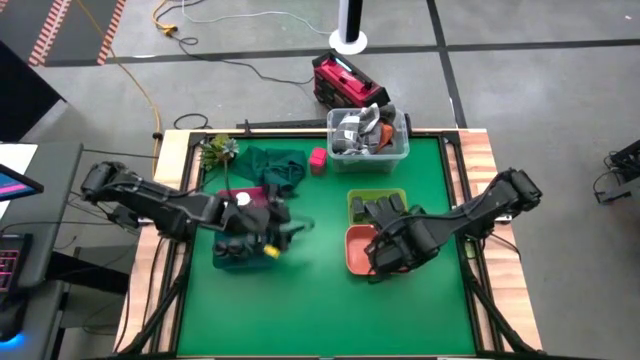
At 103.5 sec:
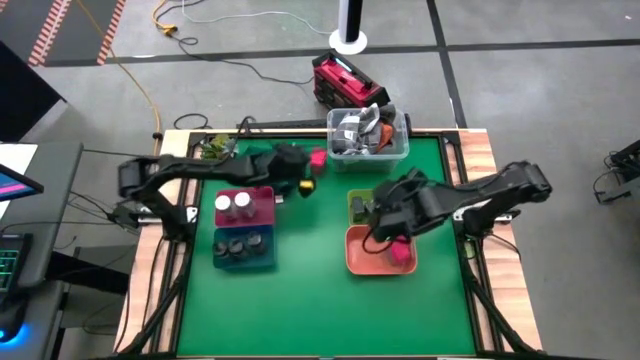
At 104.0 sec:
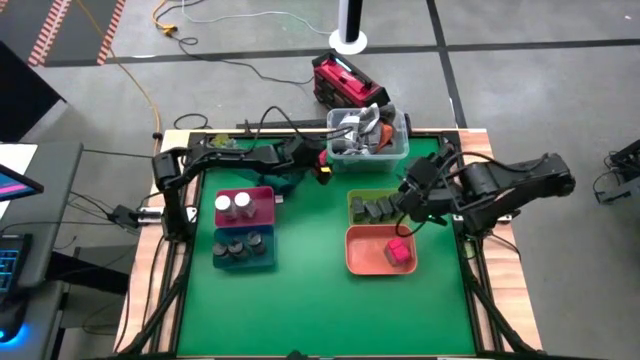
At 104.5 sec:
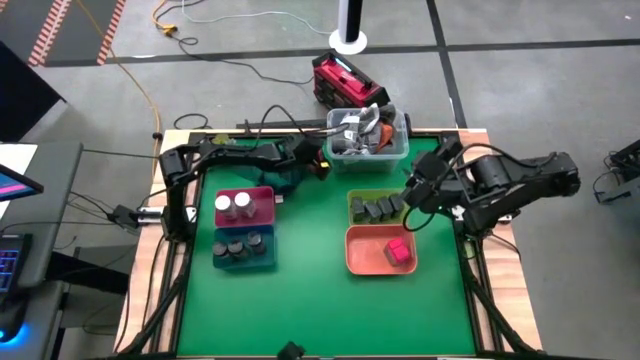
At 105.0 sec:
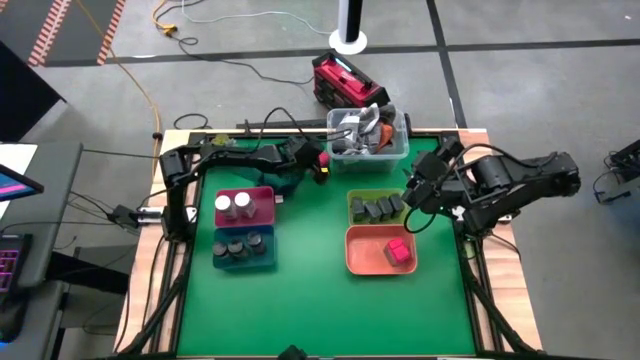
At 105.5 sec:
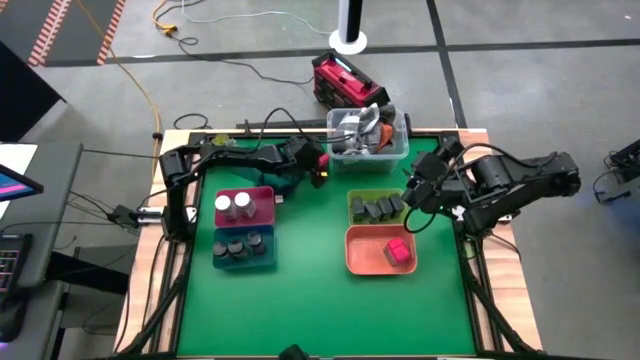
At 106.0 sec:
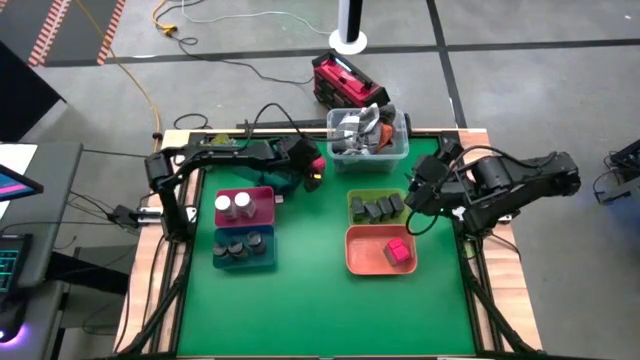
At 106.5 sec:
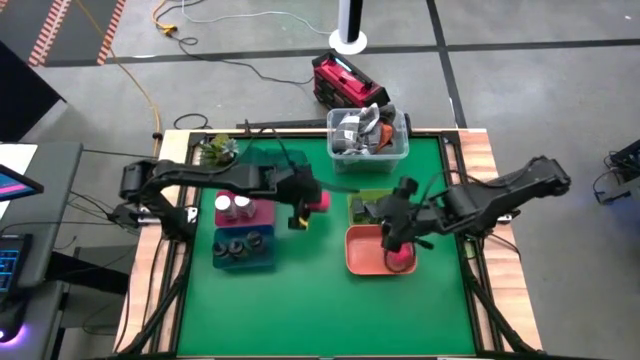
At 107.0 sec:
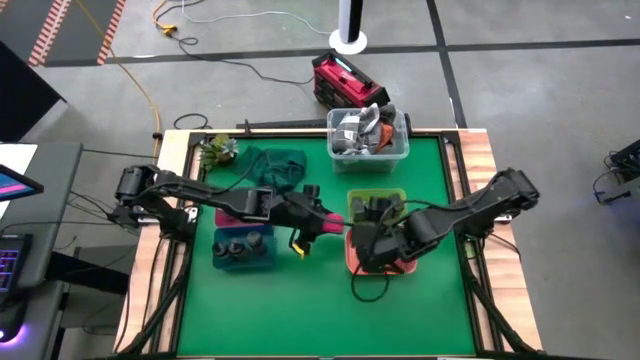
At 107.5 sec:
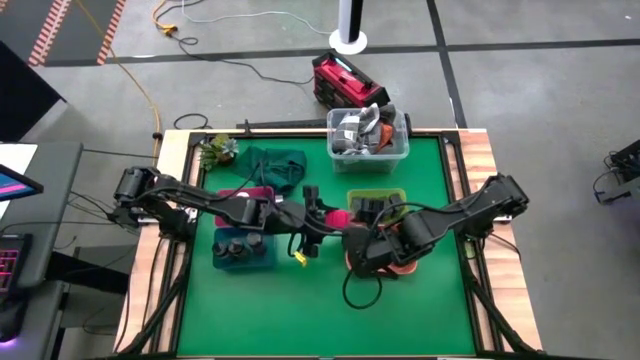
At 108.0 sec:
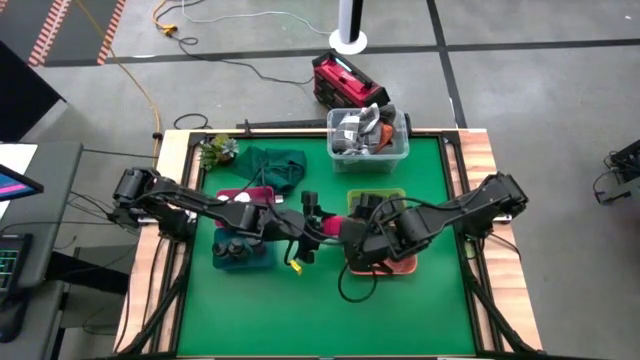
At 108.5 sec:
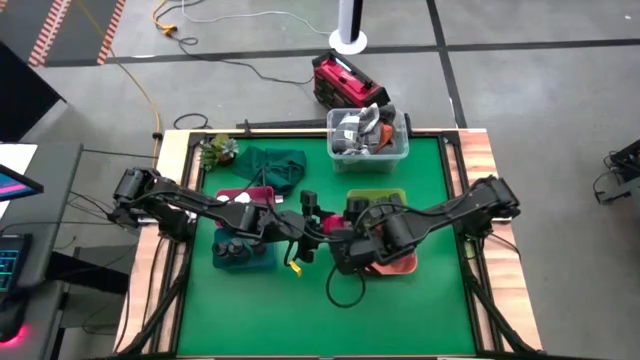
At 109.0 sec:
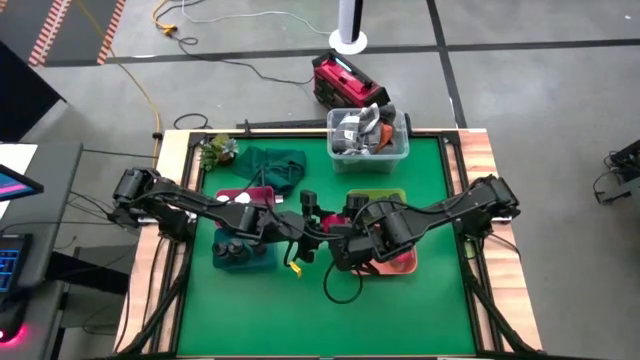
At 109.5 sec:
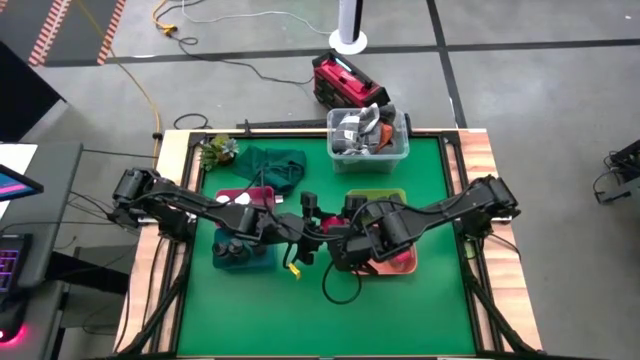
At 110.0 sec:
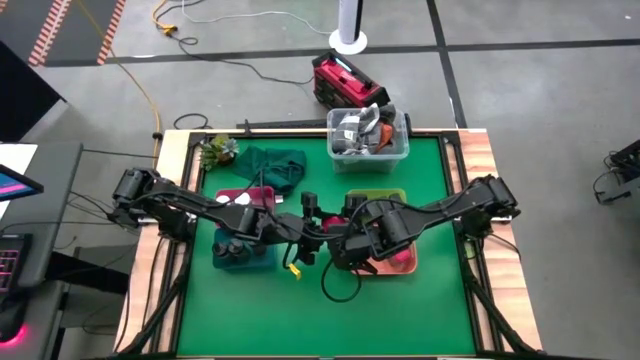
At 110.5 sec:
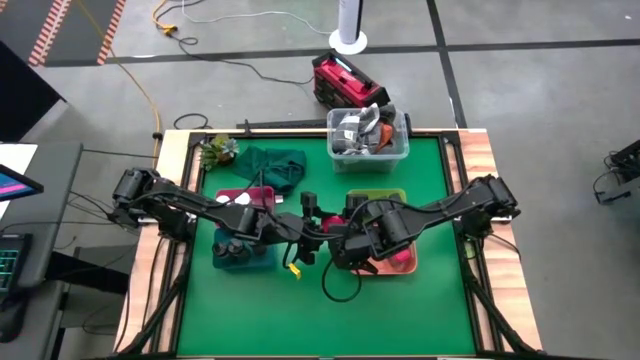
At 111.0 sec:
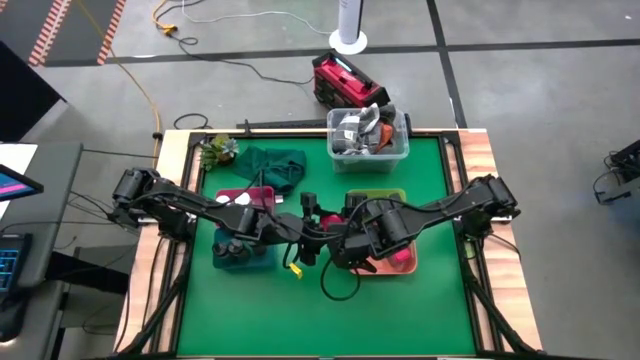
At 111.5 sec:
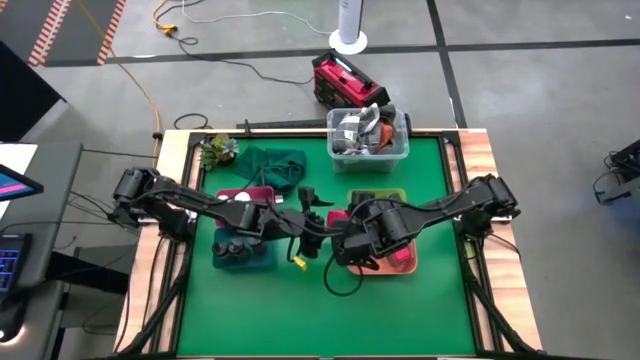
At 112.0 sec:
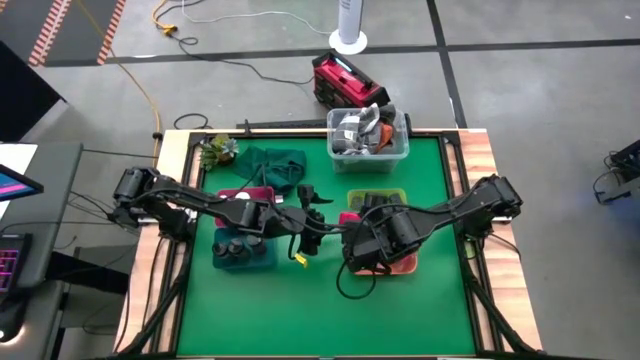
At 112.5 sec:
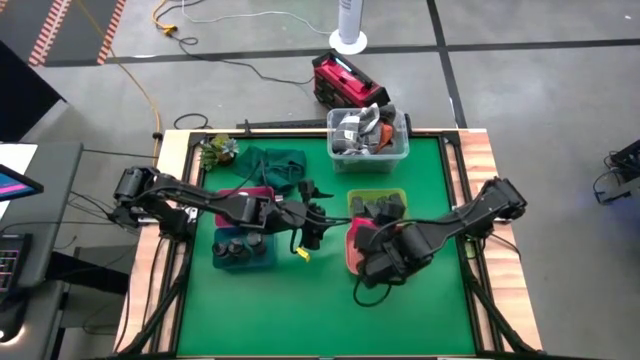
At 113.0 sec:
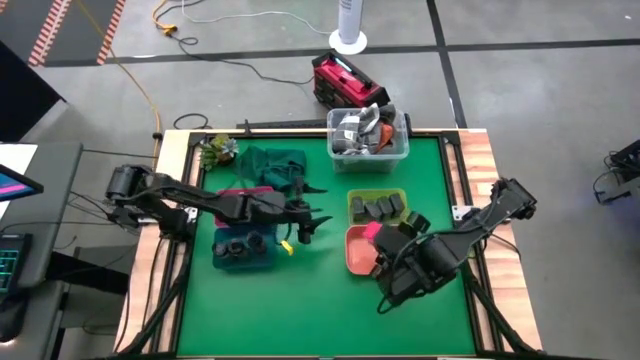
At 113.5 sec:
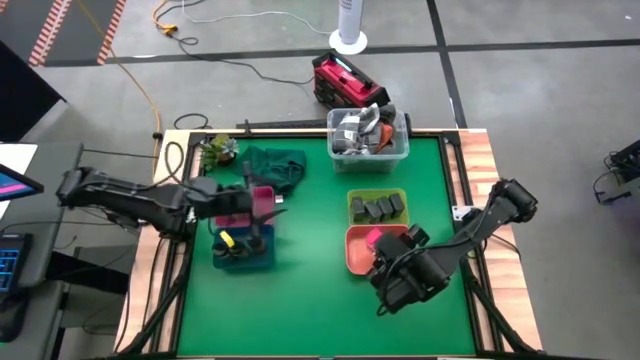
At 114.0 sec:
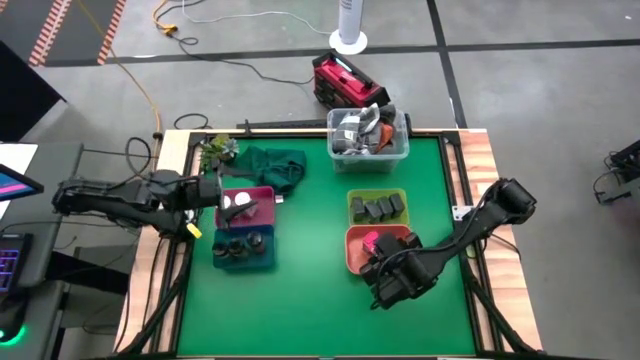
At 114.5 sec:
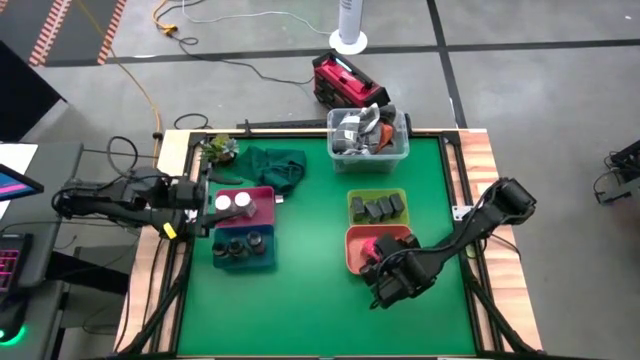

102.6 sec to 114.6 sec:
Task: Sort spices by type
Put the red spice can into the orange bin

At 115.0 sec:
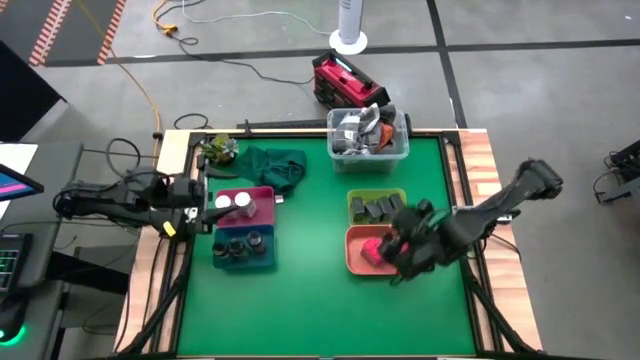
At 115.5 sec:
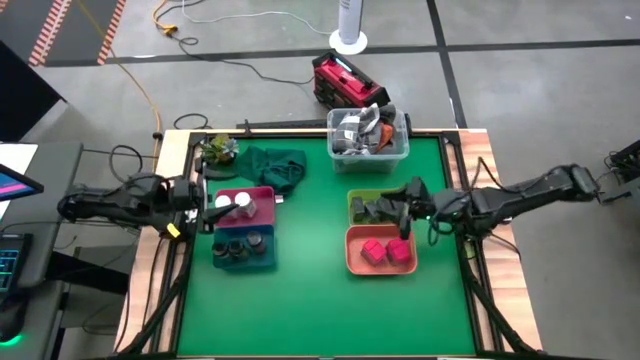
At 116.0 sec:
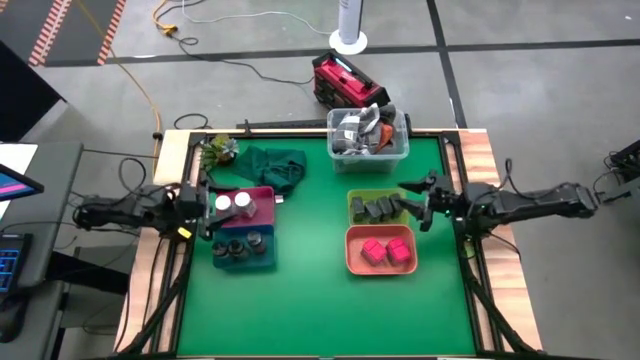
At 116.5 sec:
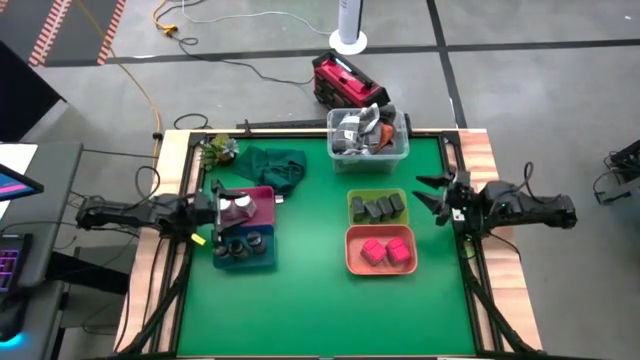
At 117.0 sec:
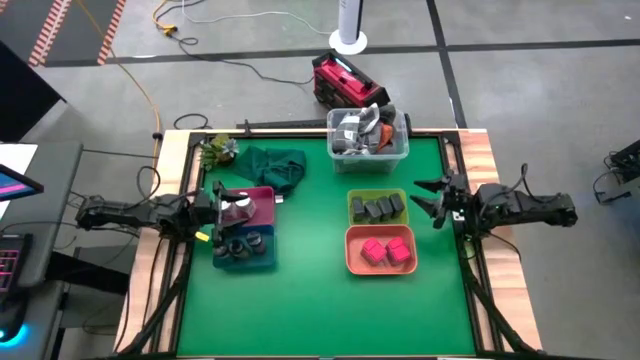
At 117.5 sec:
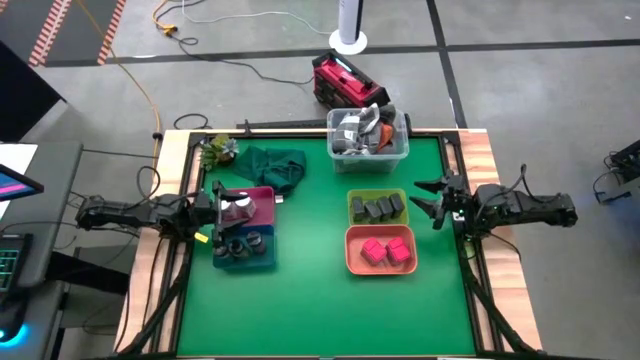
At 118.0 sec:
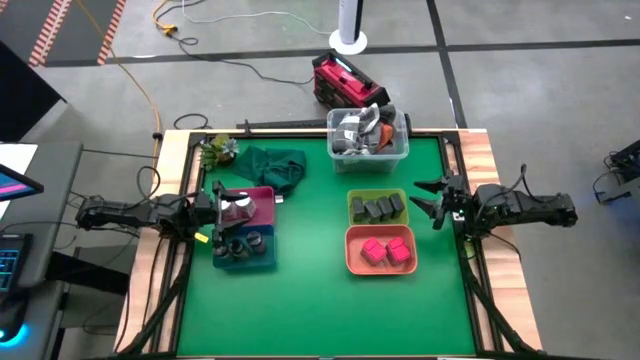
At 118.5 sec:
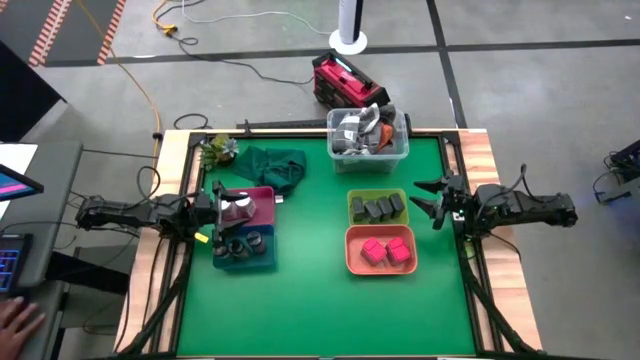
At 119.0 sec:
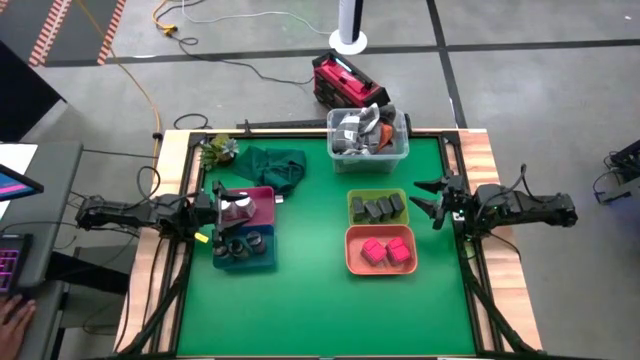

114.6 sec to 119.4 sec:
Return to Home Position

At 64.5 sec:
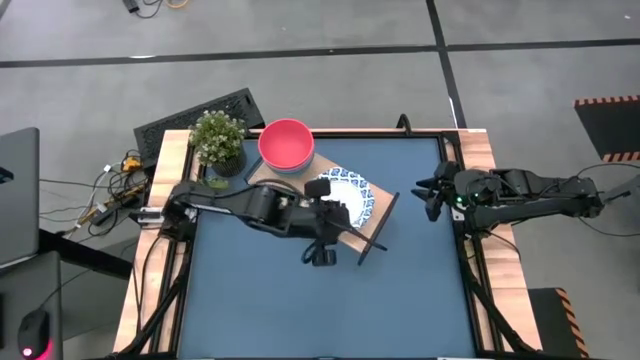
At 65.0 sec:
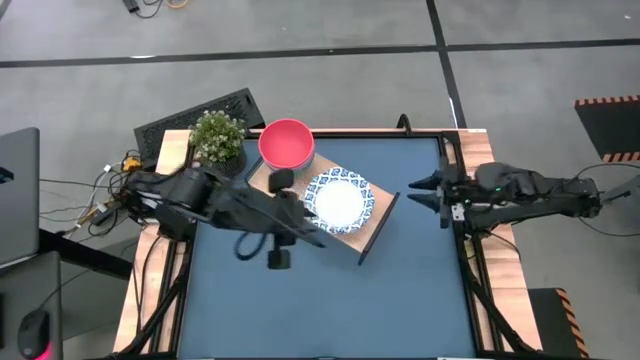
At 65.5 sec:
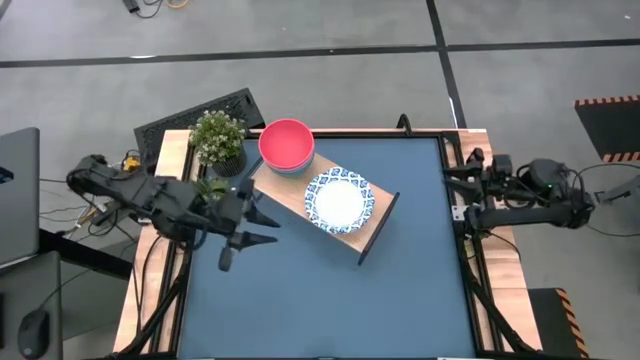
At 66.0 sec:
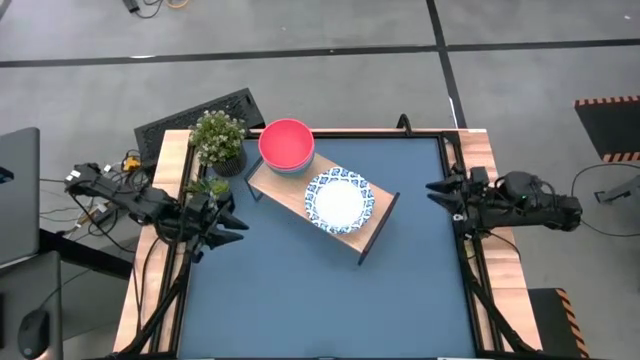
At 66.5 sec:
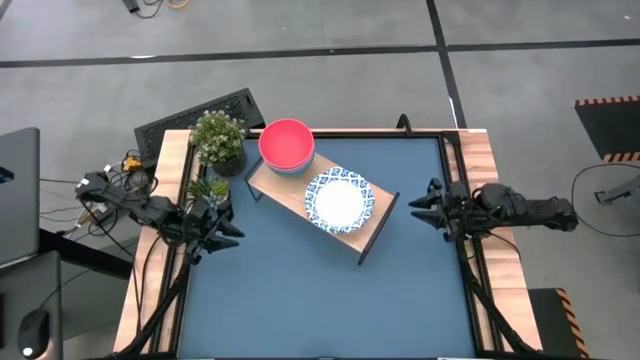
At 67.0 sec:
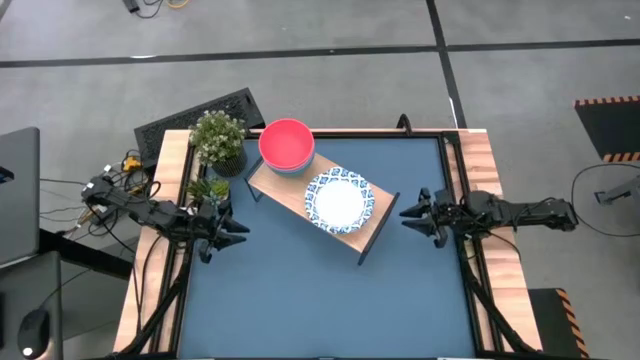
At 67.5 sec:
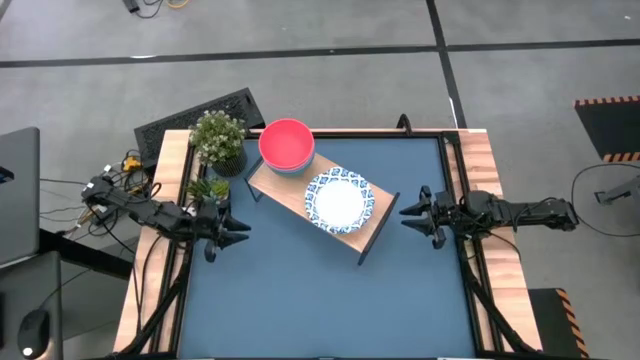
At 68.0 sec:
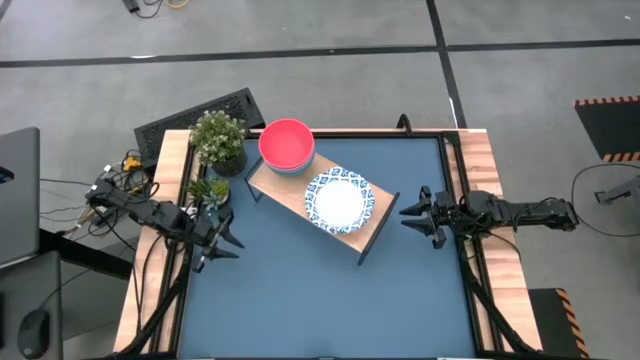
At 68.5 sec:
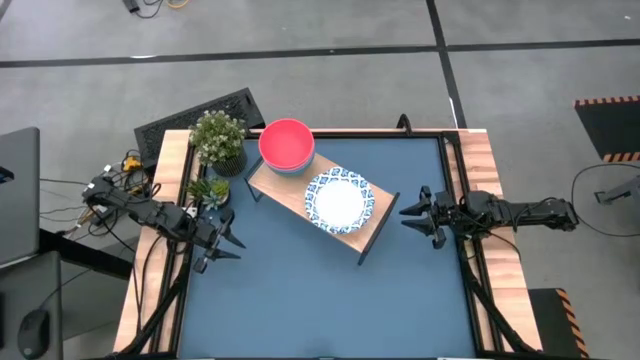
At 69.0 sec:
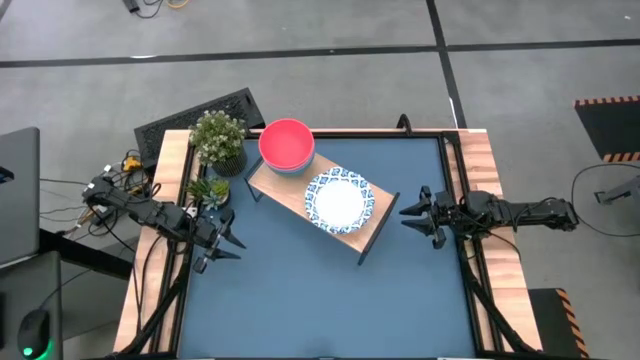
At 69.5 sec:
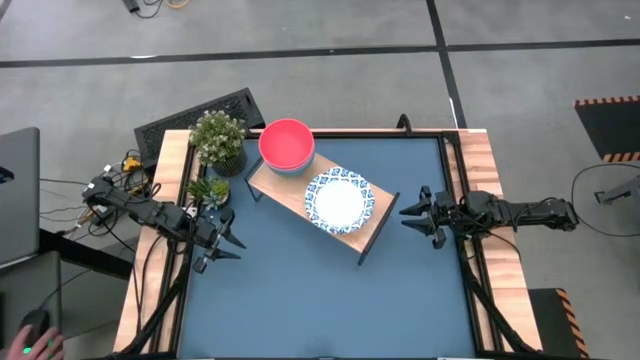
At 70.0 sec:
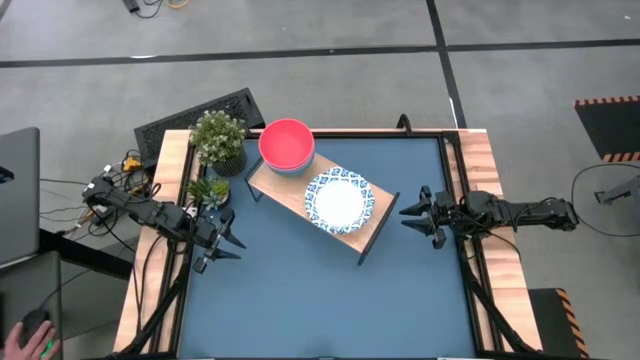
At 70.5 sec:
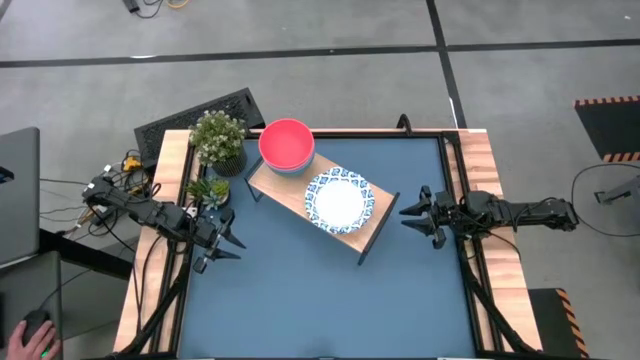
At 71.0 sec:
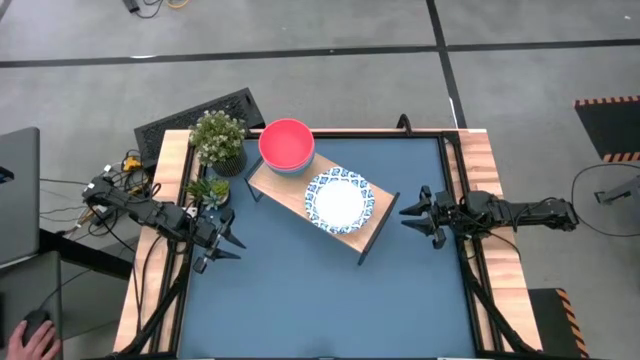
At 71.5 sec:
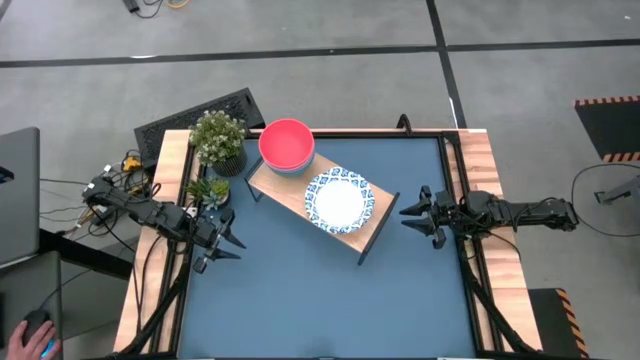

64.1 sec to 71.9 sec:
Task: Place and stack bowls onto a shelf
Return to Home Position
